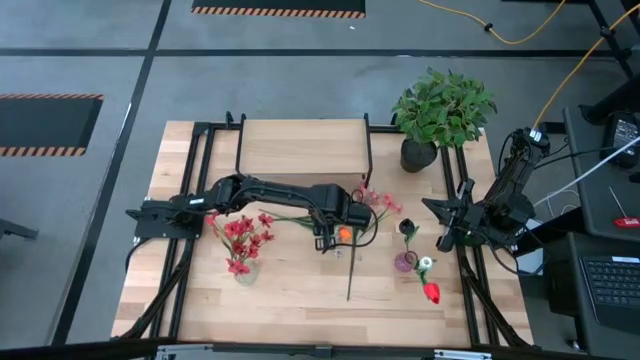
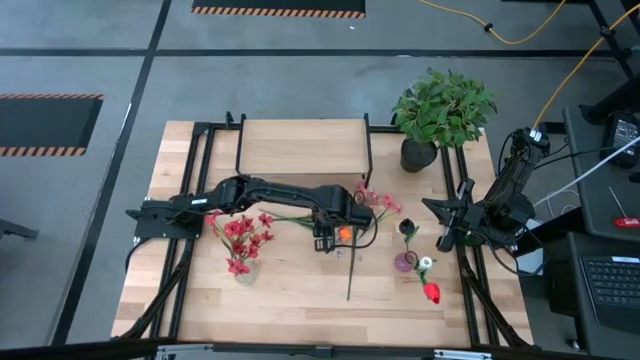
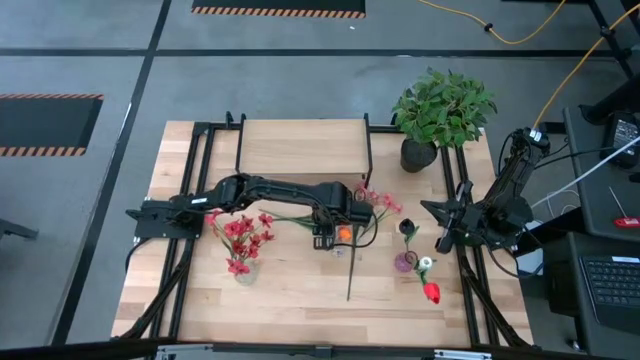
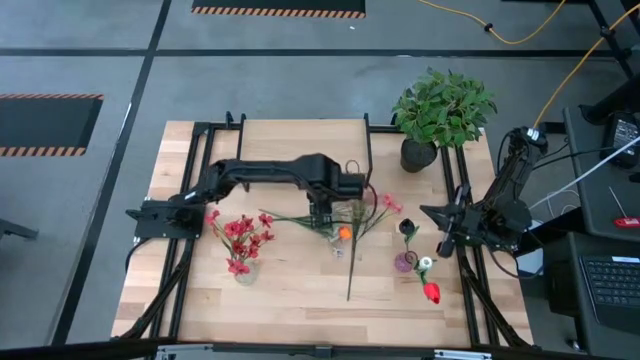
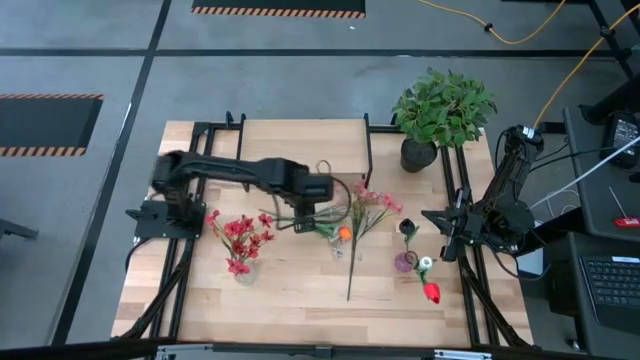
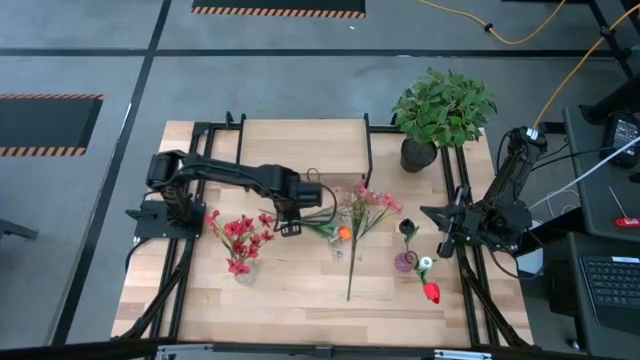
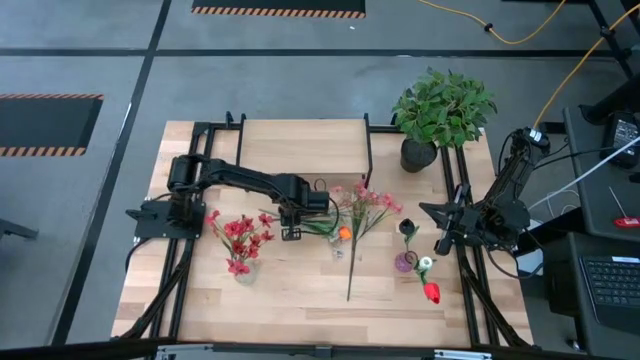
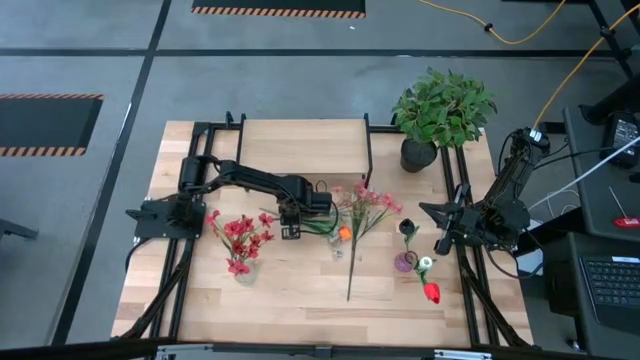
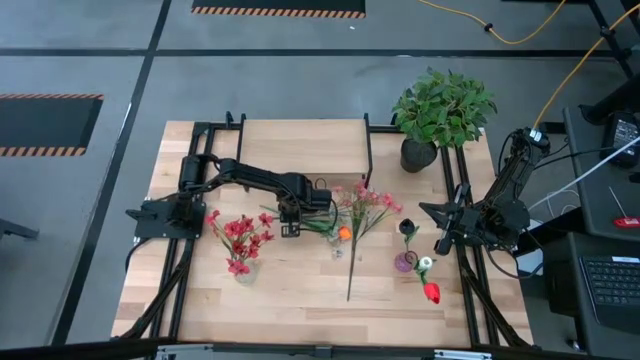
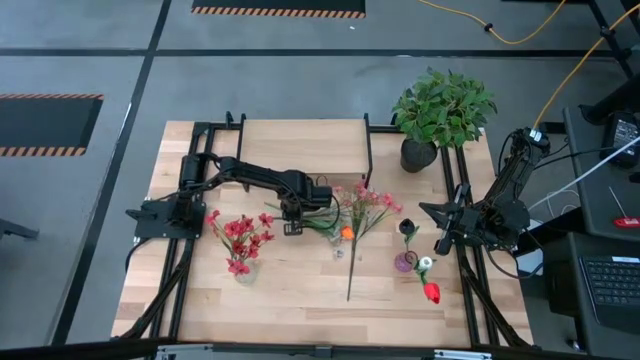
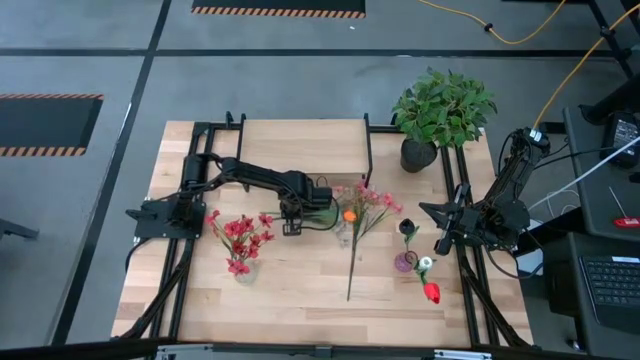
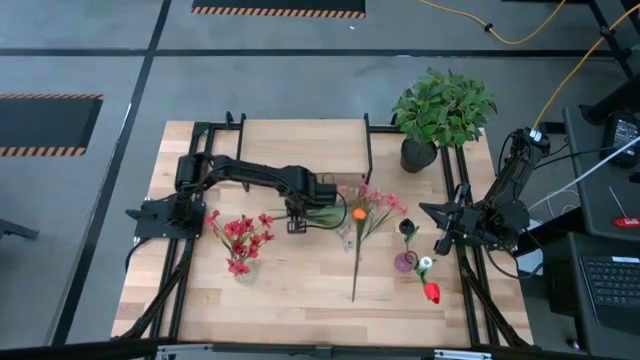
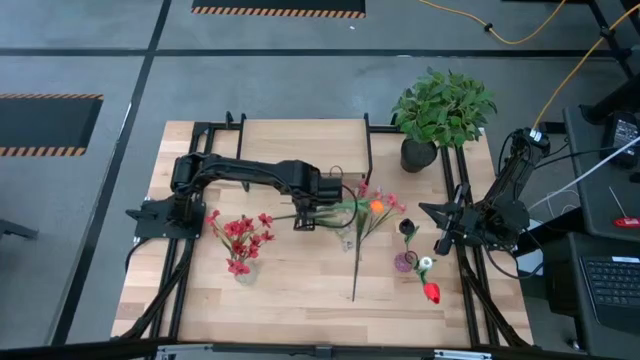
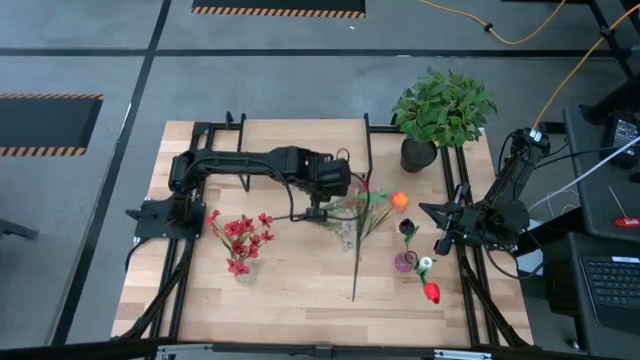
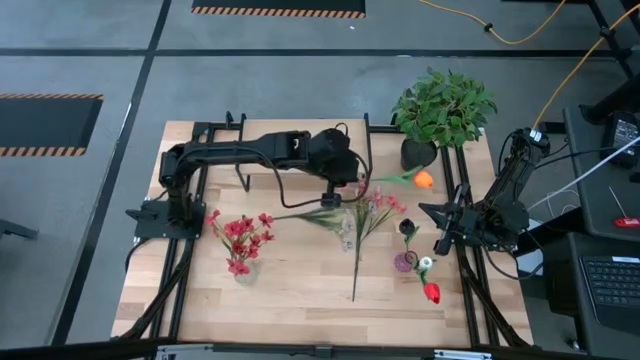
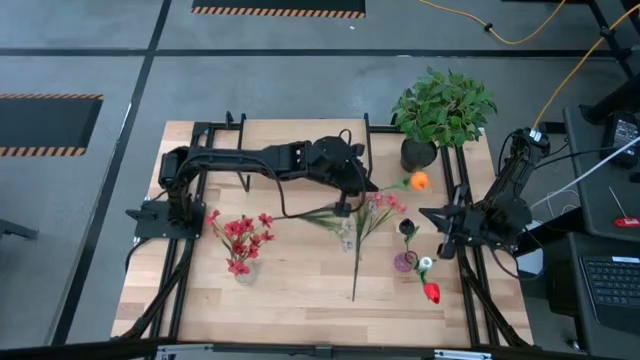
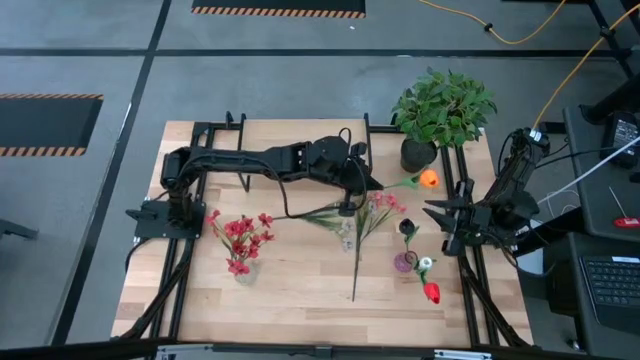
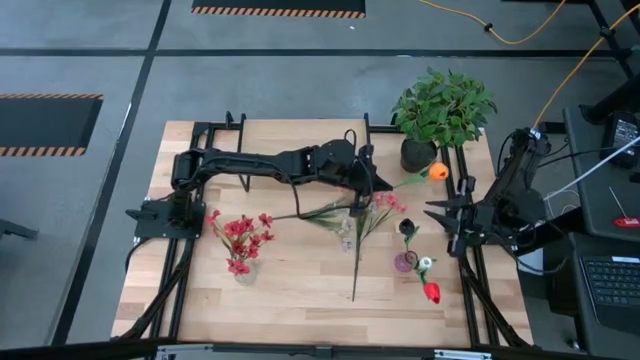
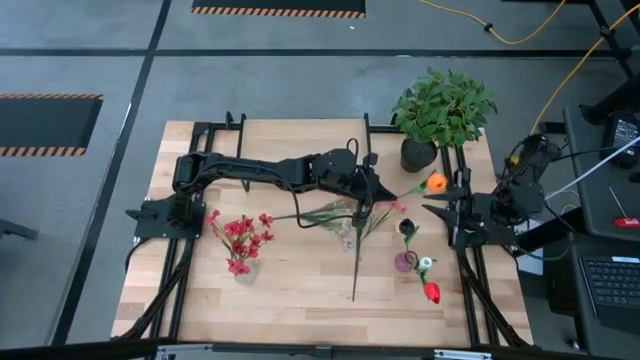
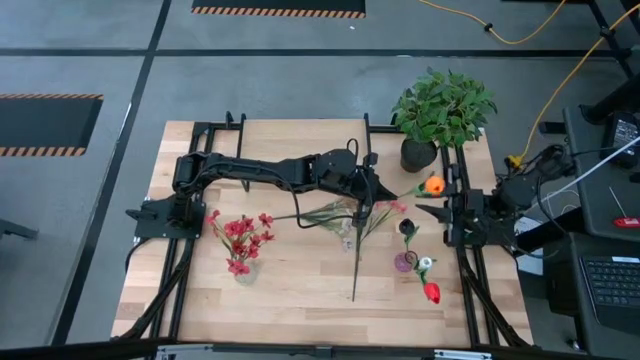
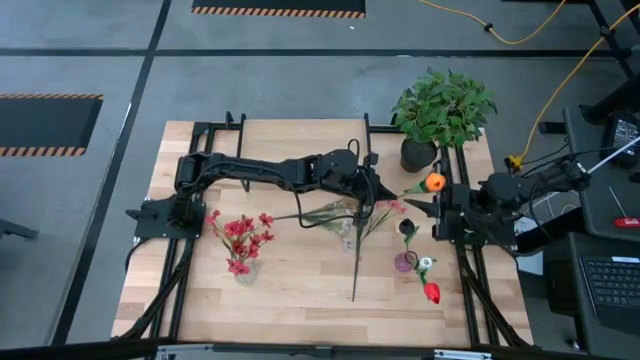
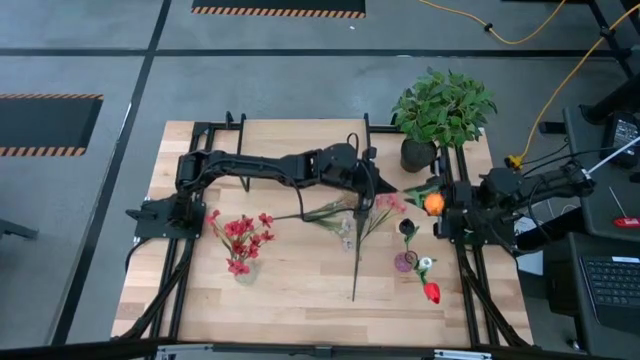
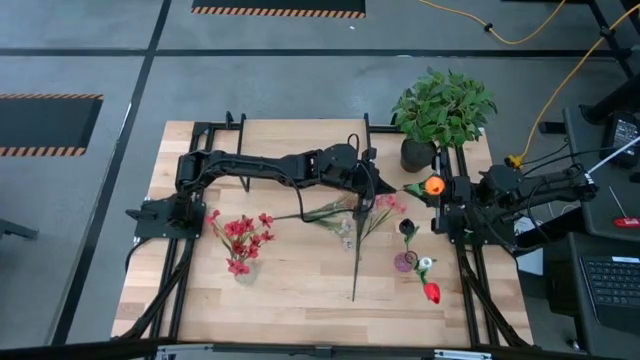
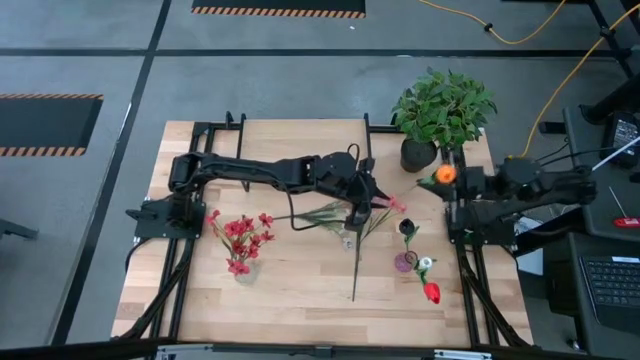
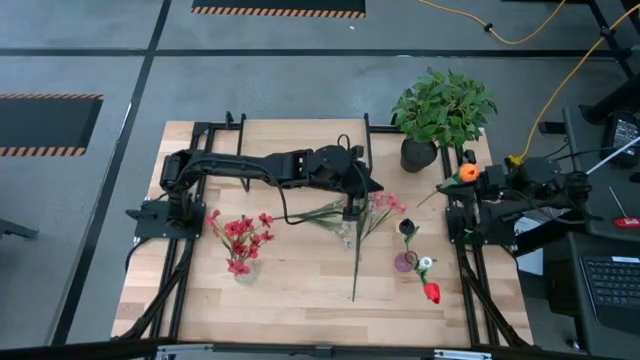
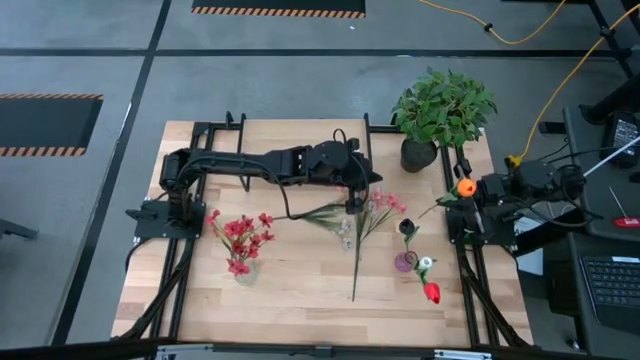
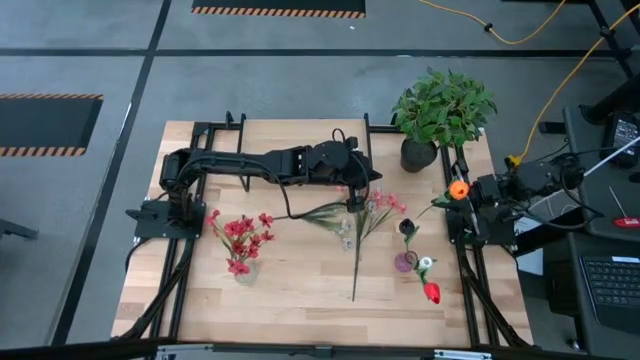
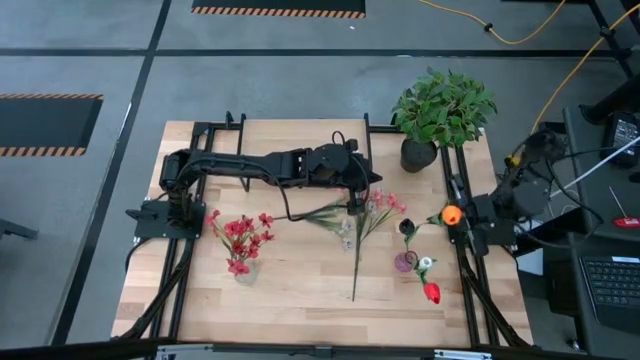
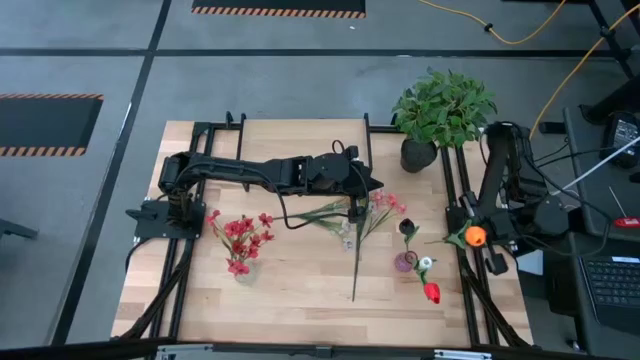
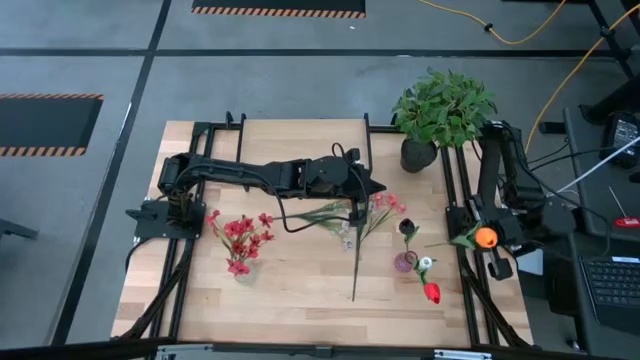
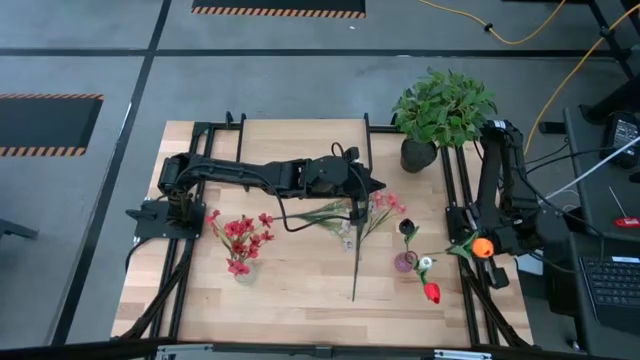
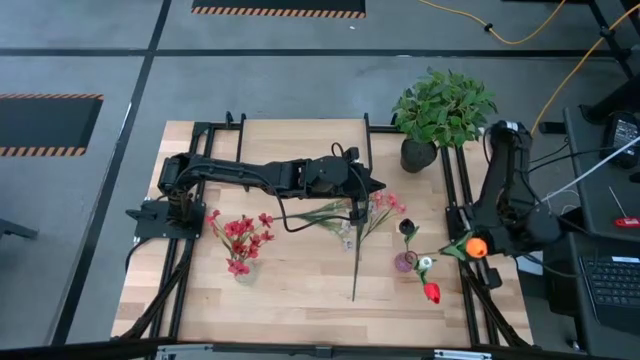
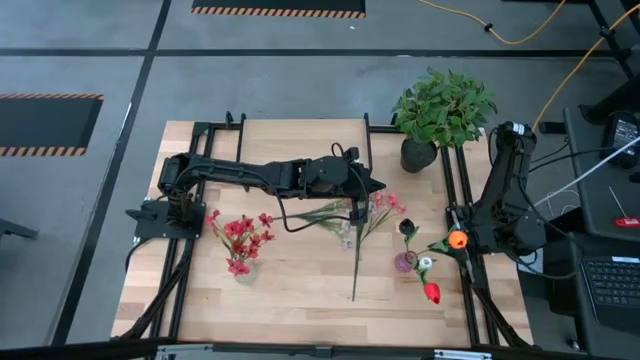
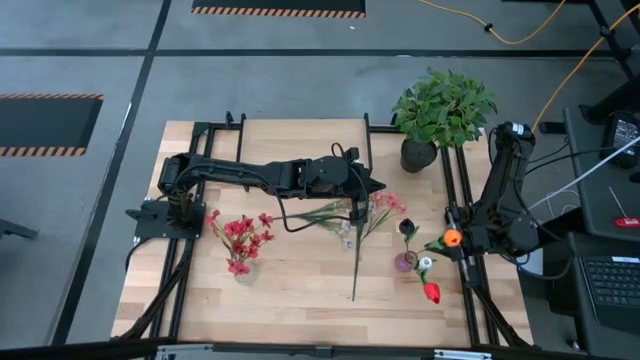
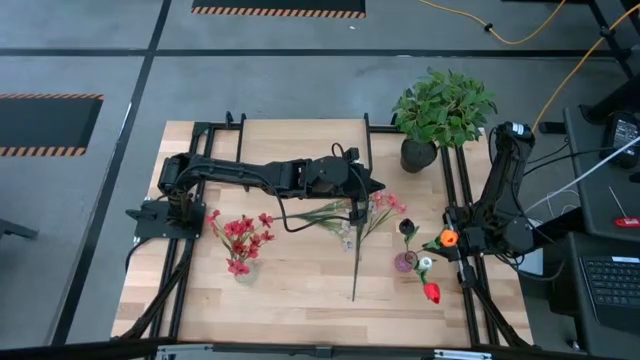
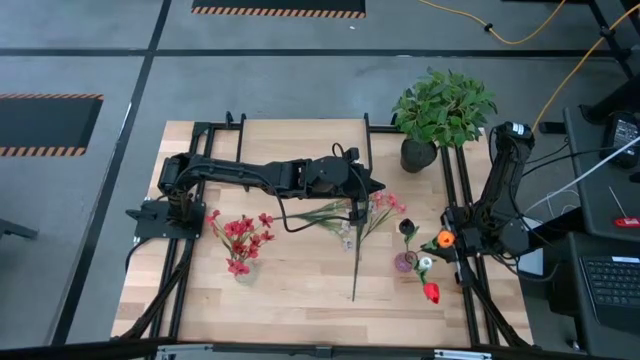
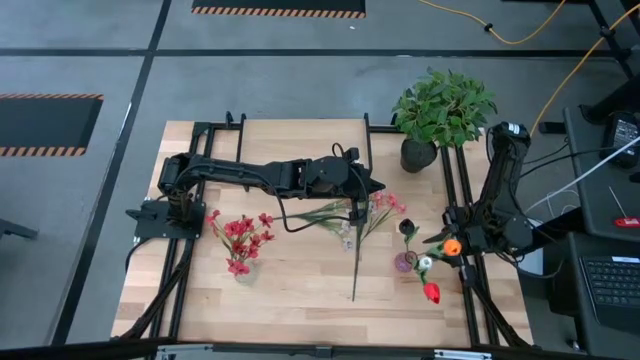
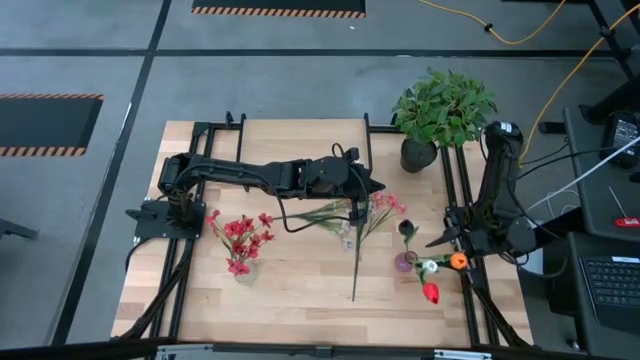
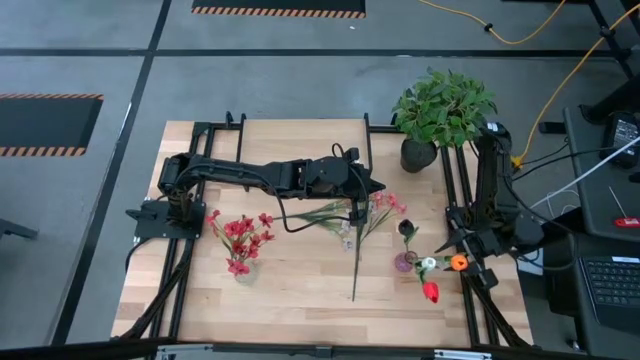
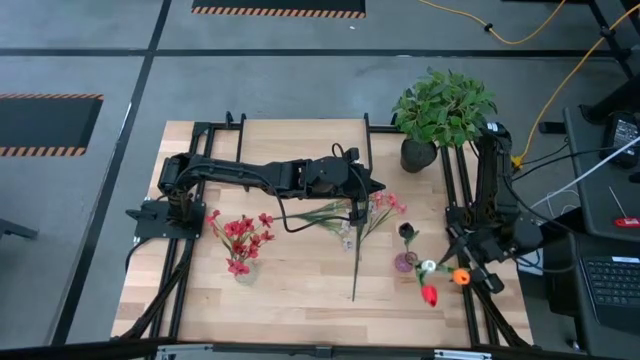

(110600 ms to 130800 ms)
Task: Pick and place flowers into a vace then onto a shelf
Put the orange flower into the pink vase

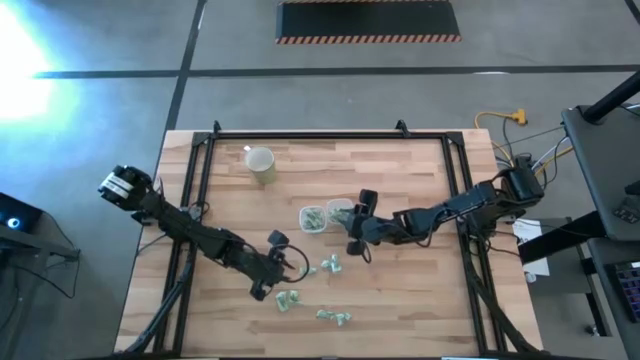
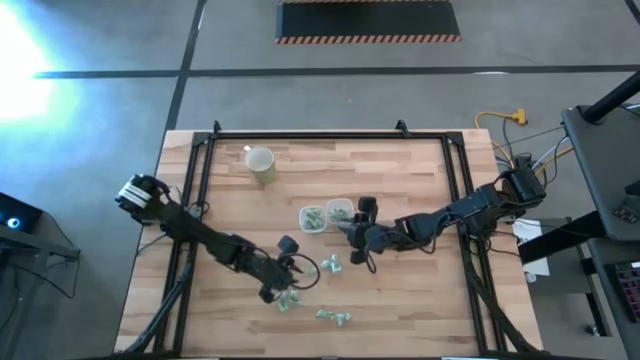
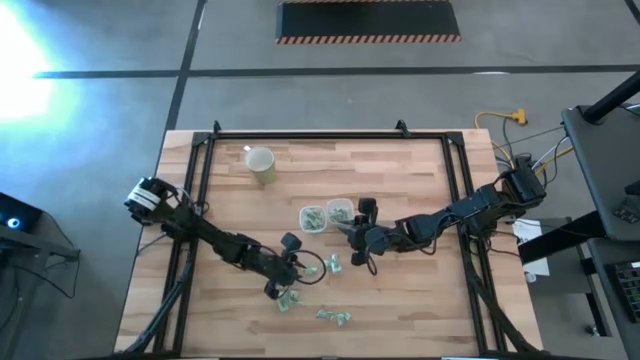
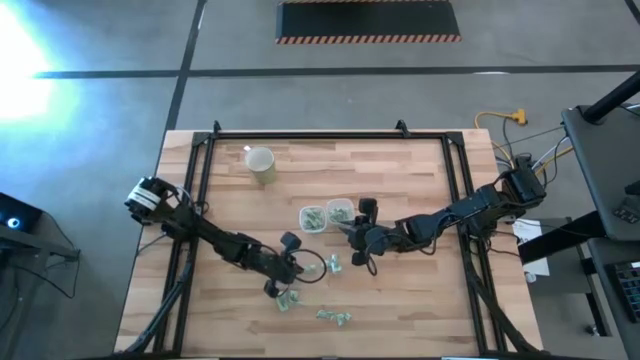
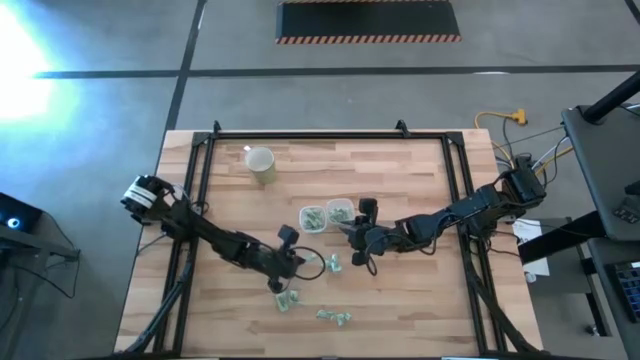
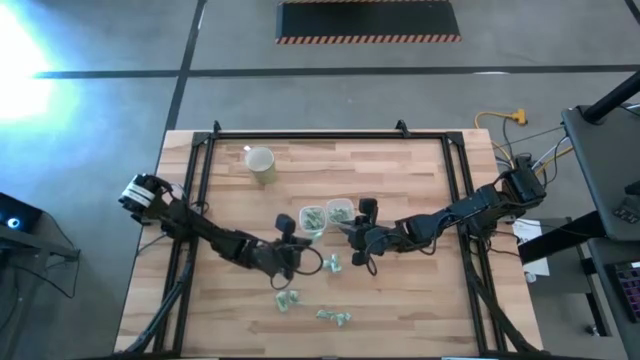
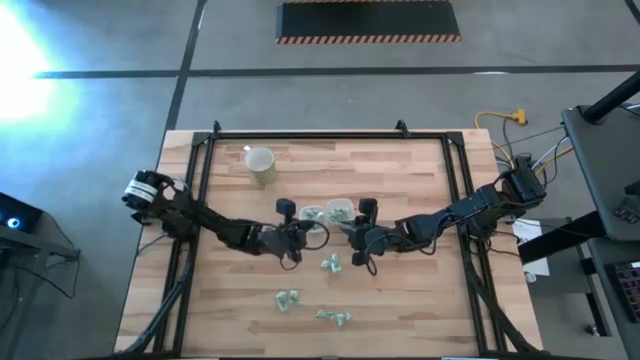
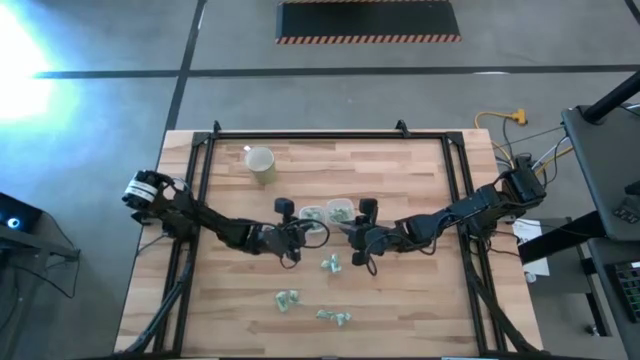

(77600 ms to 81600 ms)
Task: Pick and place items into bin
Put the stevia packet into the left transparent bin
